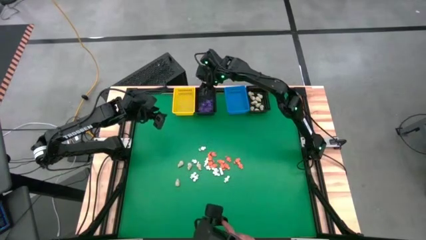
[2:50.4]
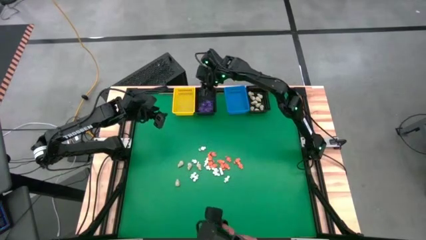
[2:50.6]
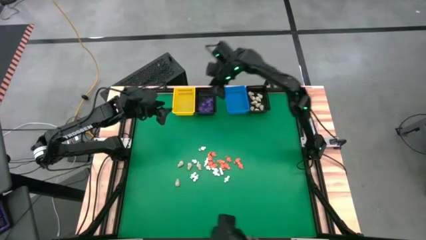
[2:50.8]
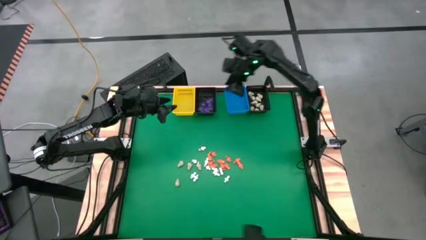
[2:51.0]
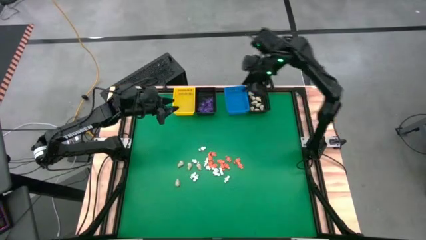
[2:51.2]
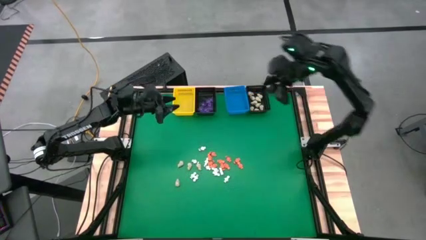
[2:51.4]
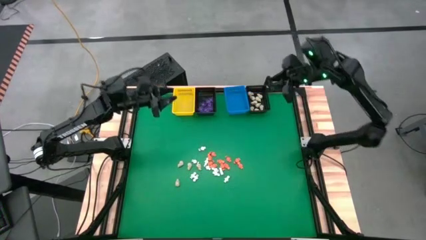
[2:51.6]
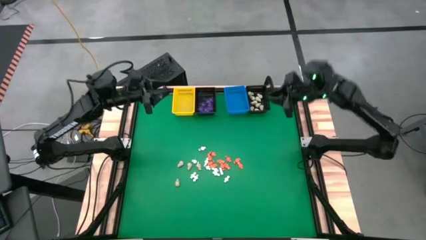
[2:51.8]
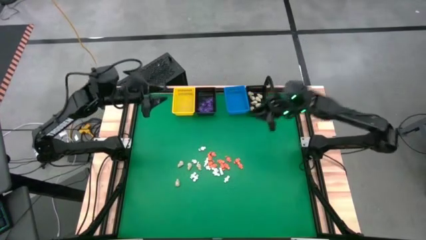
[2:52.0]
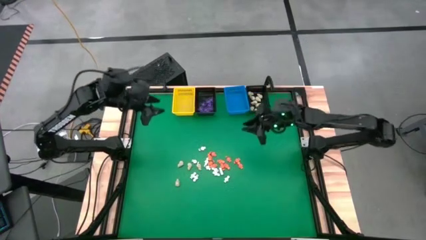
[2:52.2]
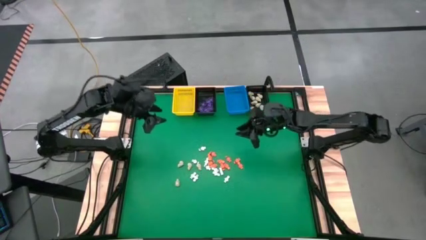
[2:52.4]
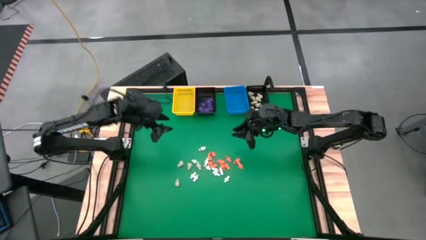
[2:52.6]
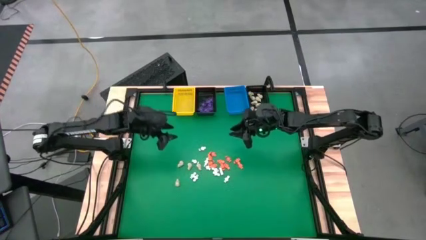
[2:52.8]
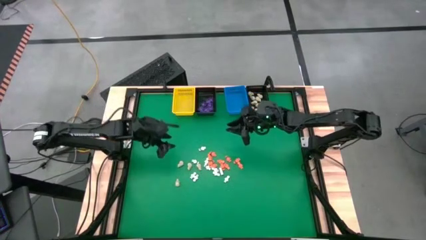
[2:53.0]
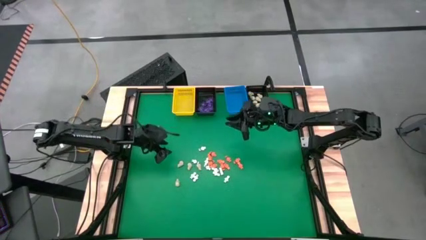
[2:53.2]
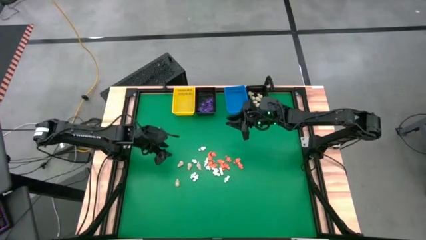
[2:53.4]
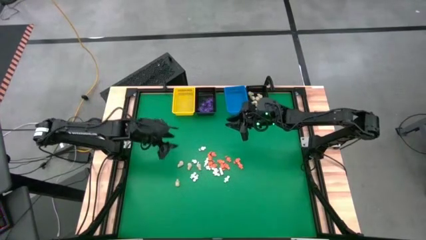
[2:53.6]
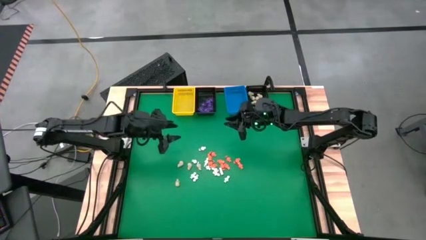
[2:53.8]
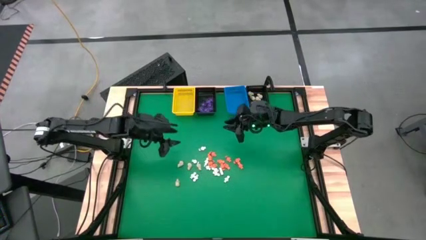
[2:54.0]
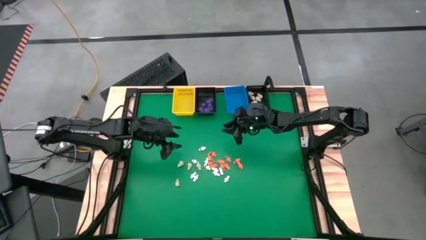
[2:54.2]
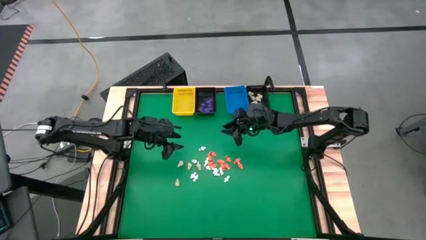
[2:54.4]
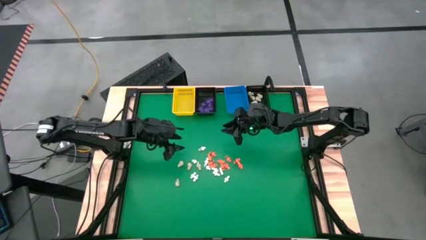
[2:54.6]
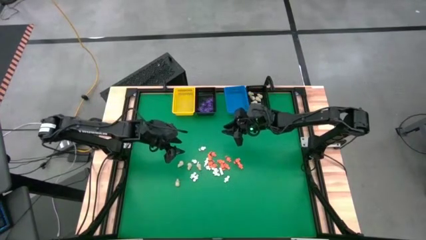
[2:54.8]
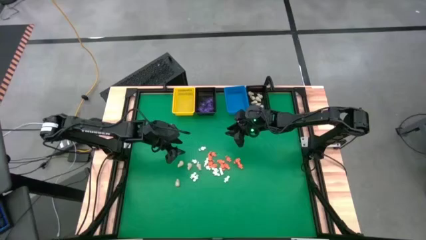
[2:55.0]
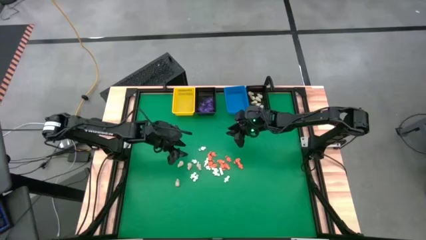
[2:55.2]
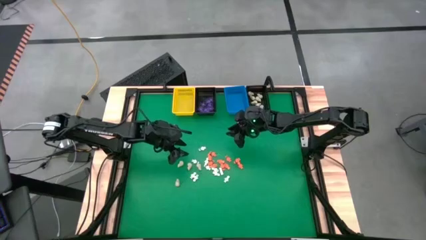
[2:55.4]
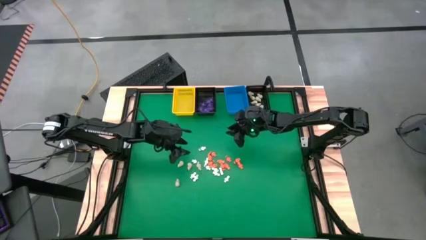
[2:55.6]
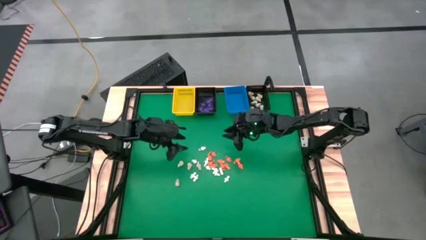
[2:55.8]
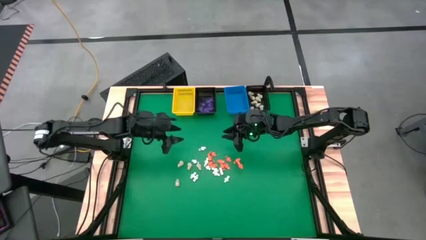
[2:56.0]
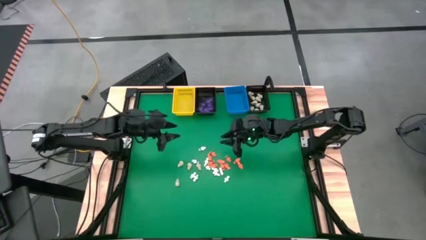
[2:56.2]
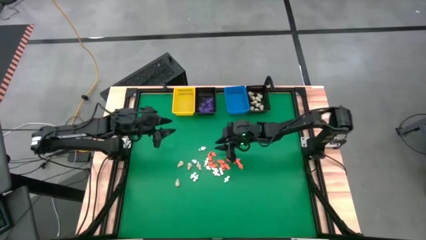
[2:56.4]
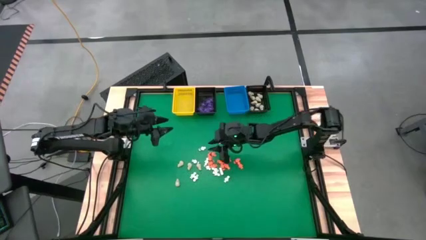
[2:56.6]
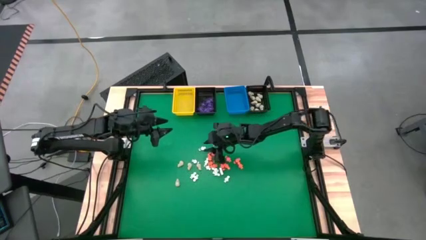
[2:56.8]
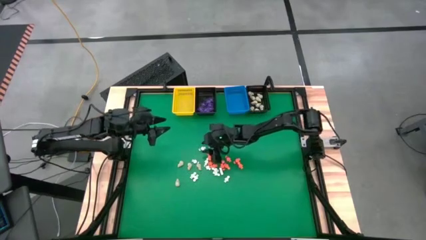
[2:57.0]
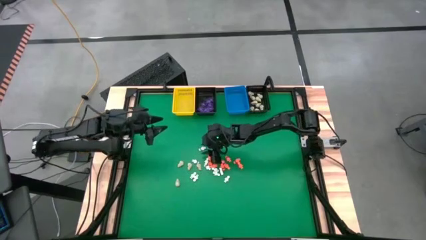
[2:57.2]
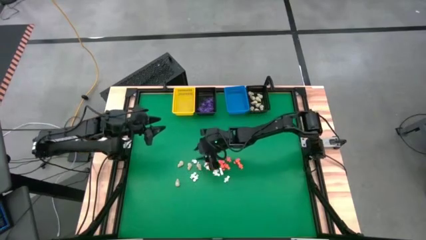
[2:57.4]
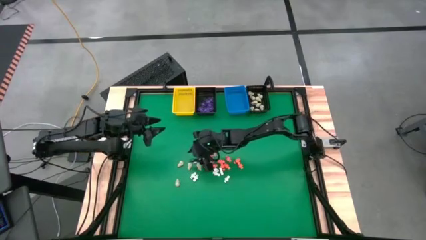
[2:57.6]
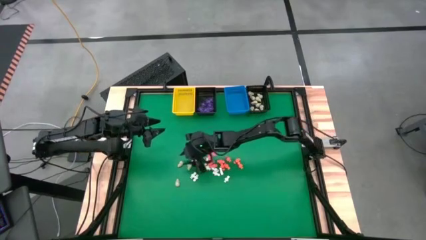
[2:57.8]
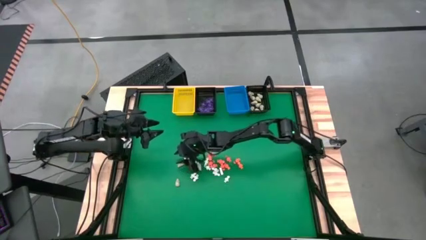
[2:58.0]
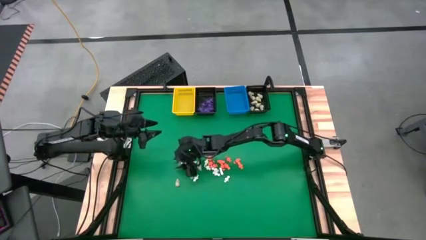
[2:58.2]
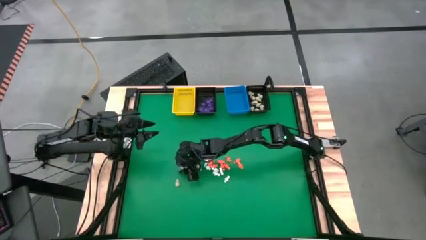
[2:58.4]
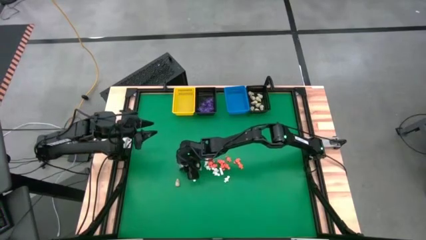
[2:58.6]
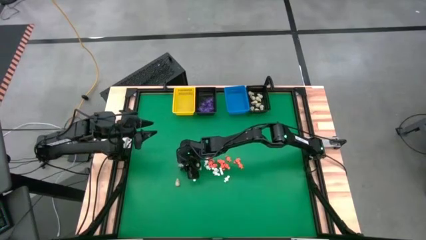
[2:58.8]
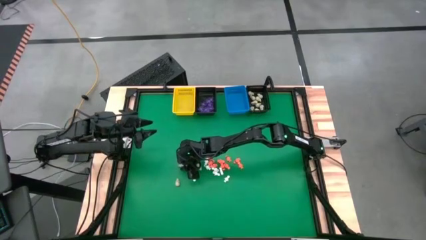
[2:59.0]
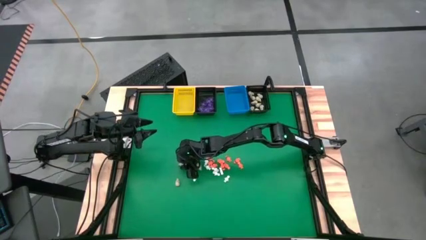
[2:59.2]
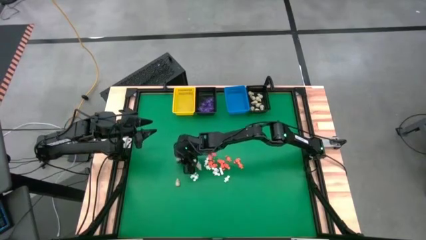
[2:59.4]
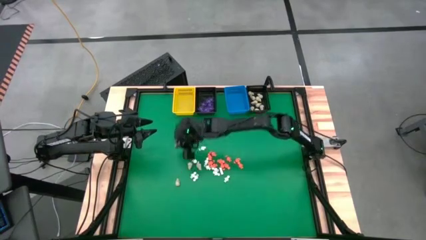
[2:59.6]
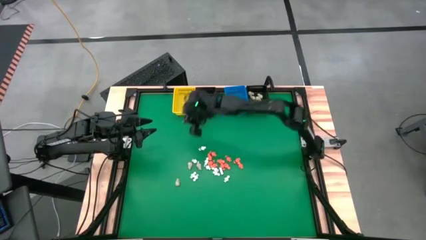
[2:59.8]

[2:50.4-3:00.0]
Task: Sort Halloween decoration
Put the white skull toy into the right black basket

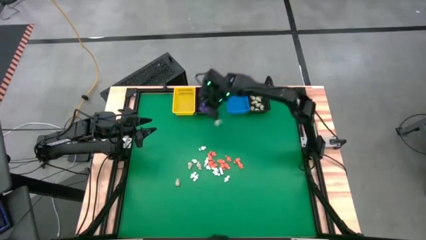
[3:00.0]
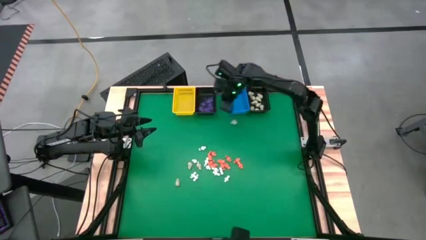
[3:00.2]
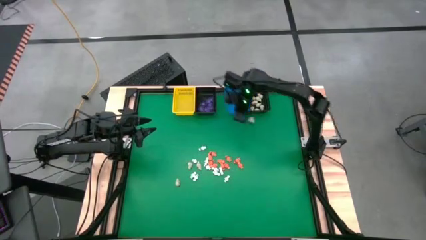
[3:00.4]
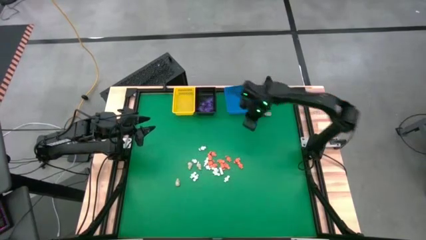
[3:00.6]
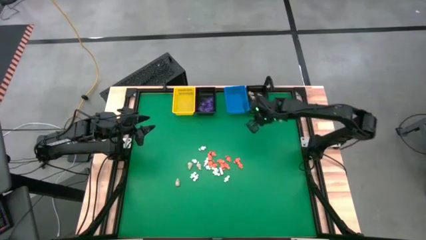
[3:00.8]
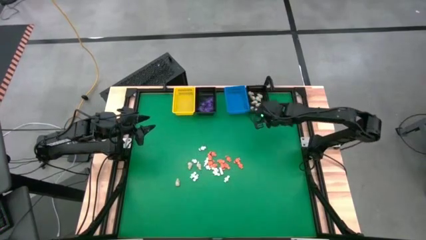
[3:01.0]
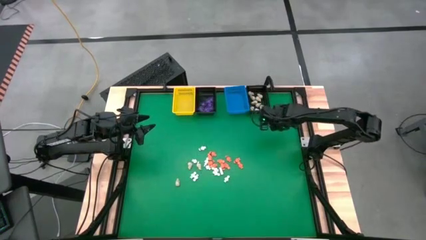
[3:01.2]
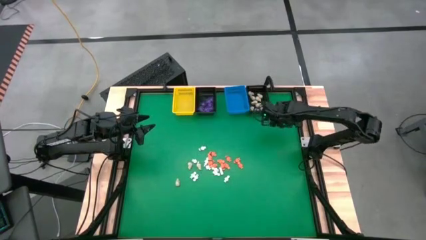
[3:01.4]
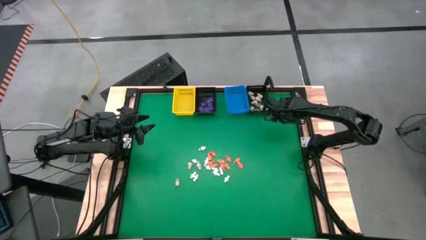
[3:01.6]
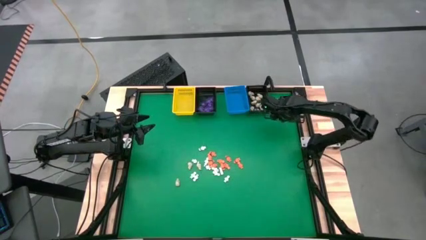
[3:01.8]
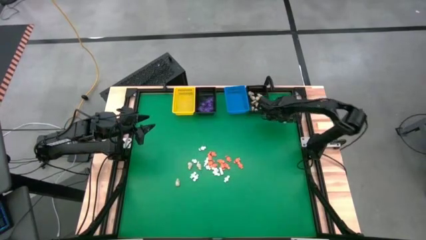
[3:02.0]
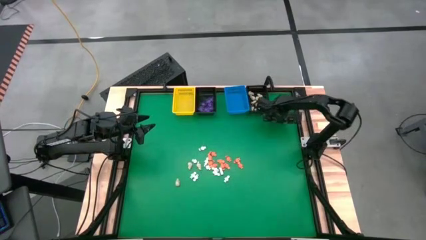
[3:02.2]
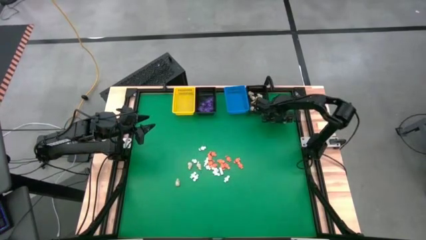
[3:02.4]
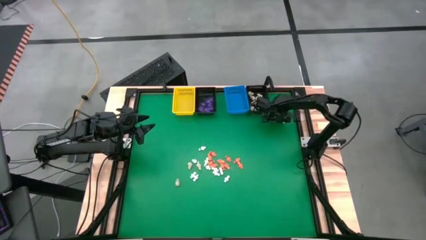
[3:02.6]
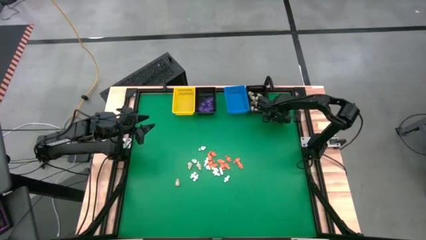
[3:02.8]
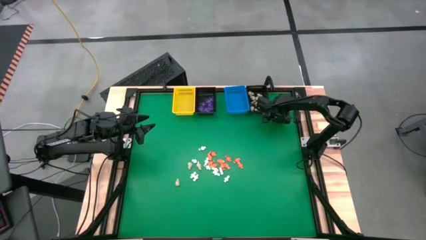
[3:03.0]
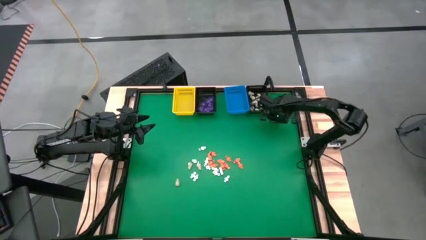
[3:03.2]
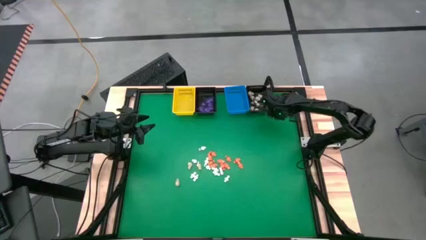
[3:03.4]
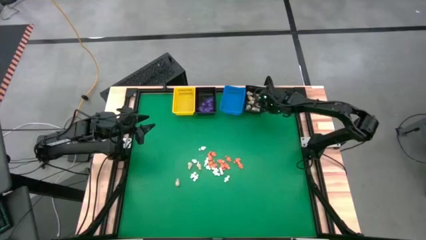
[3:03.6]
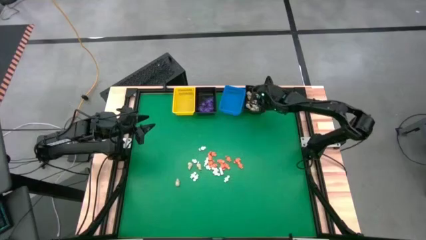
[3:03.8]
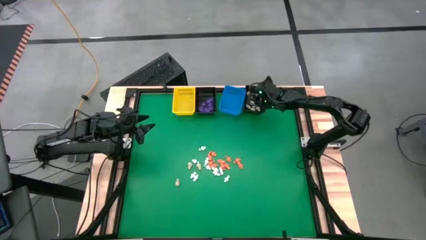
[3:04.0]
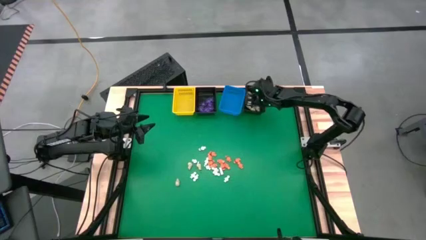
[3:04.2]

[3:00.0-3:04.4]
Put the white skull toy into the right black basket

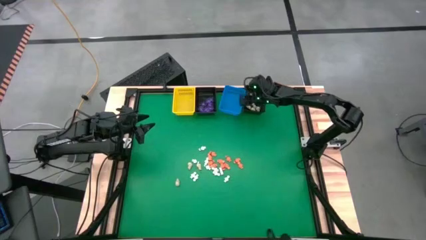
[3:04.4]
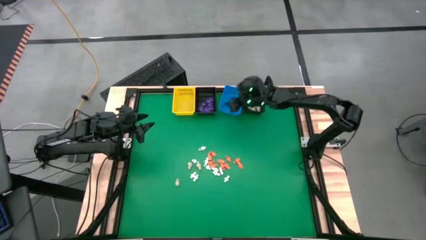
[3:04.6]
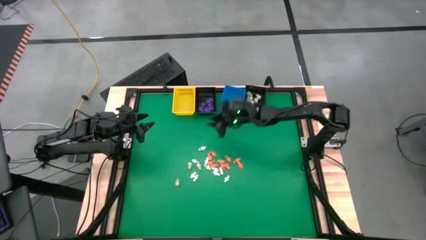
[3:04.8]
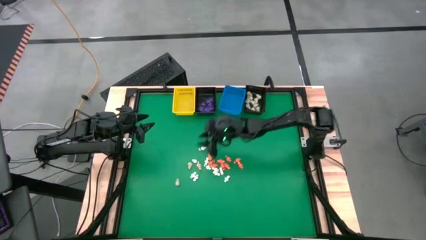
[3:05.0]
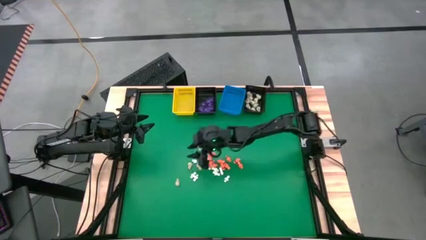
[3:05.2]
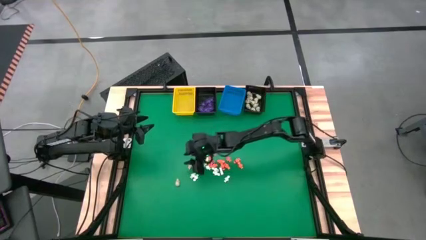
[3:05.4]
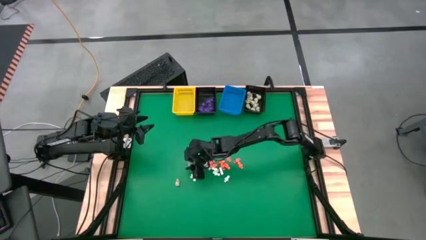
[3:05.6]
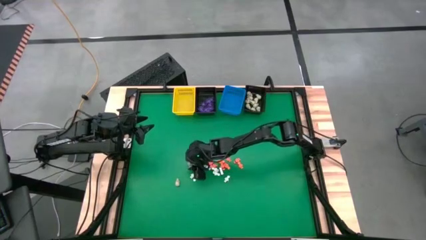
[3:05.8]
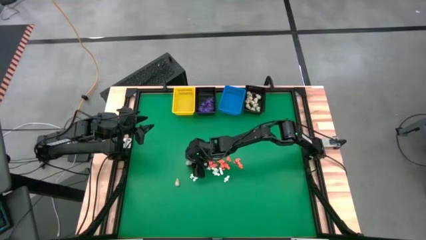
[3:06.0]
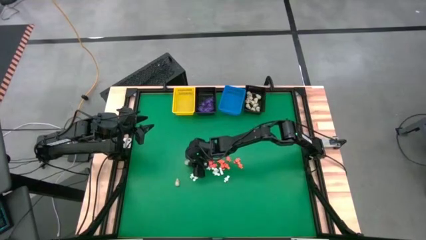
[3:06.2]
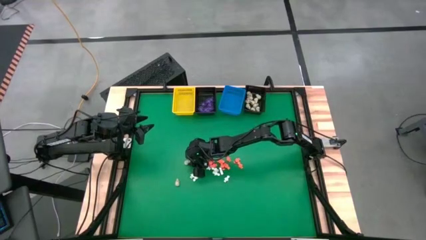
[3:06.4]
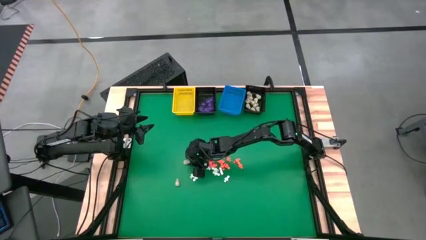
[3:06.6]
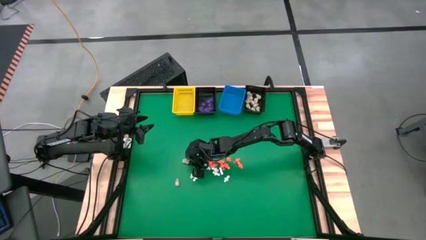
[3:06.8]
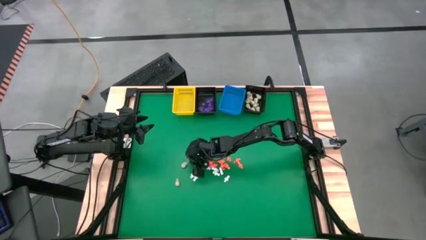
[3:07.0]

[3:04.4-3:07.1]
Put the white skull toy into the right black basket
